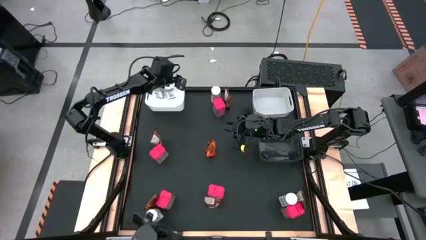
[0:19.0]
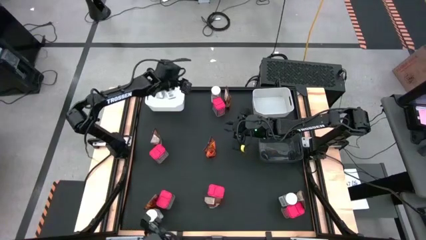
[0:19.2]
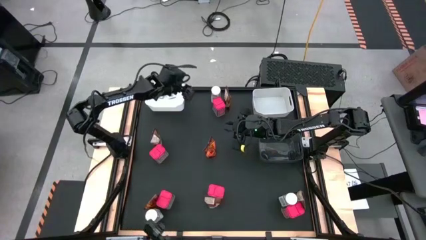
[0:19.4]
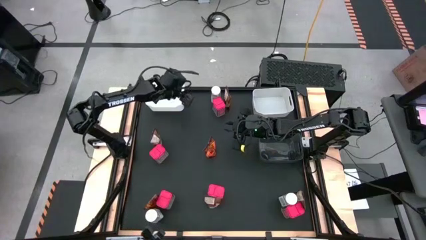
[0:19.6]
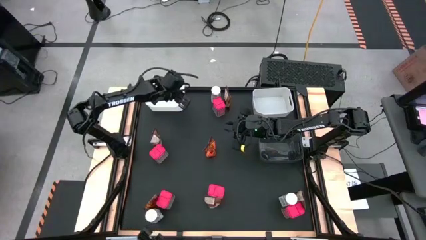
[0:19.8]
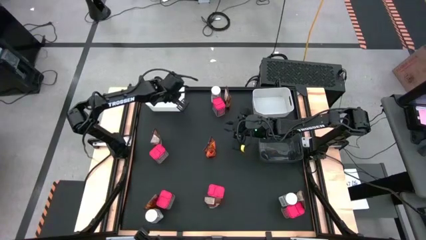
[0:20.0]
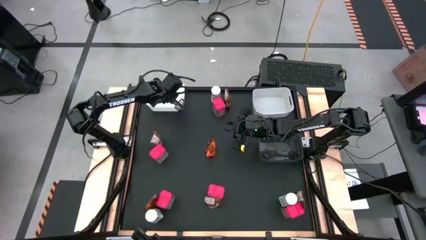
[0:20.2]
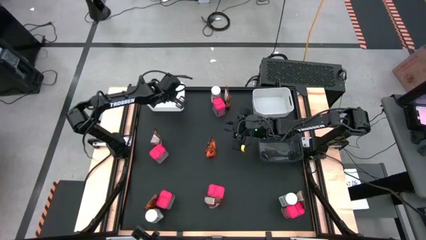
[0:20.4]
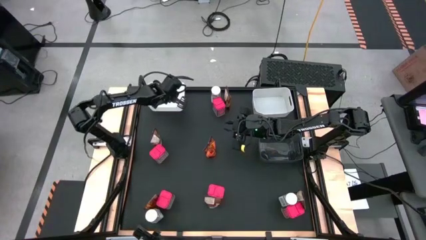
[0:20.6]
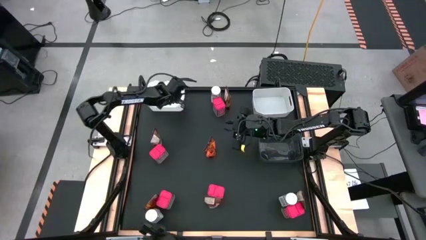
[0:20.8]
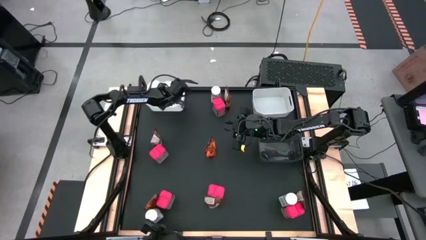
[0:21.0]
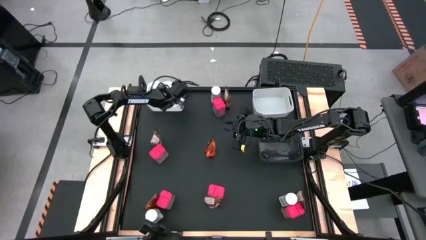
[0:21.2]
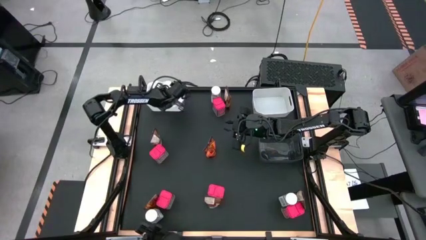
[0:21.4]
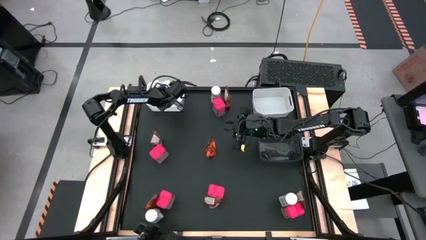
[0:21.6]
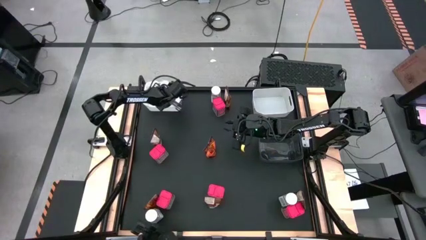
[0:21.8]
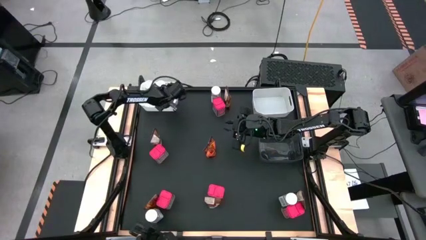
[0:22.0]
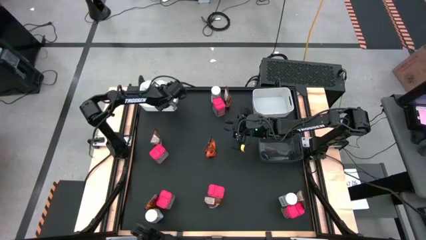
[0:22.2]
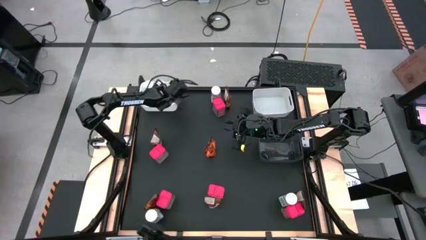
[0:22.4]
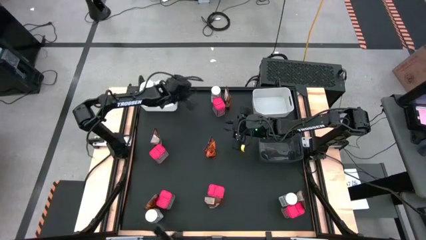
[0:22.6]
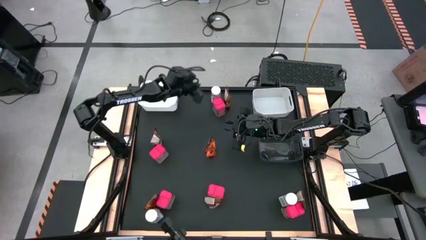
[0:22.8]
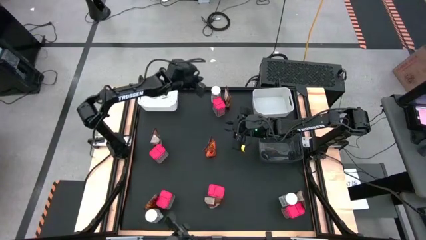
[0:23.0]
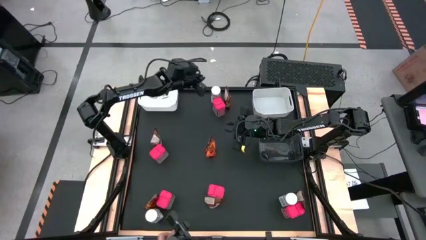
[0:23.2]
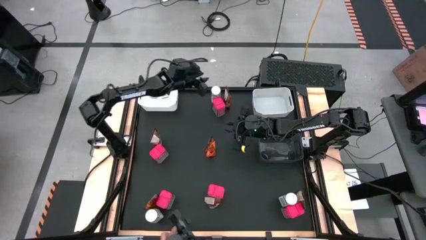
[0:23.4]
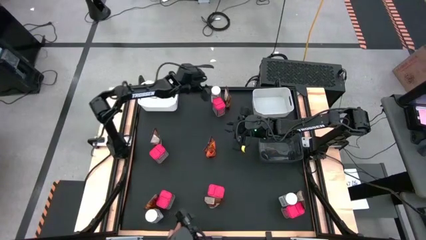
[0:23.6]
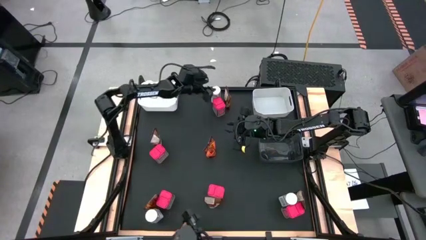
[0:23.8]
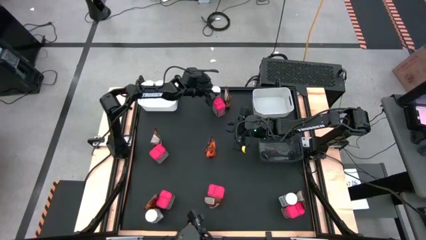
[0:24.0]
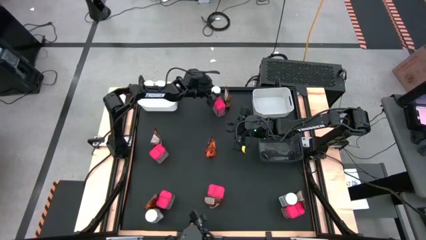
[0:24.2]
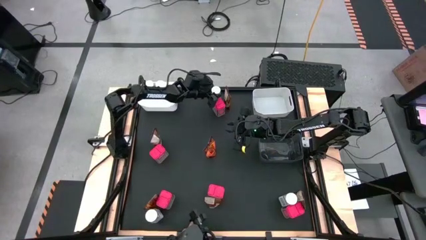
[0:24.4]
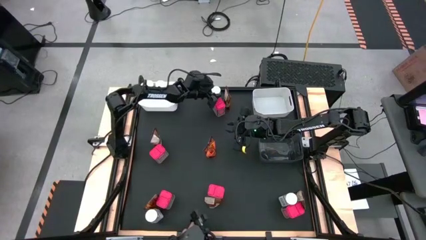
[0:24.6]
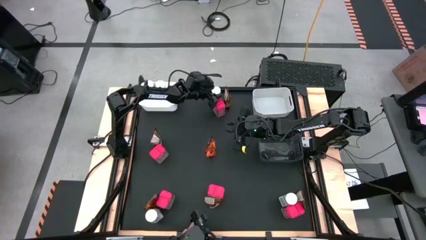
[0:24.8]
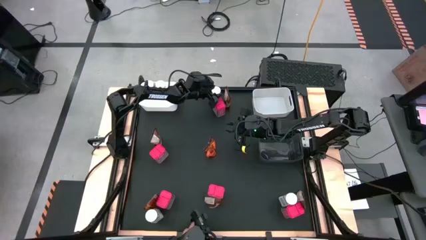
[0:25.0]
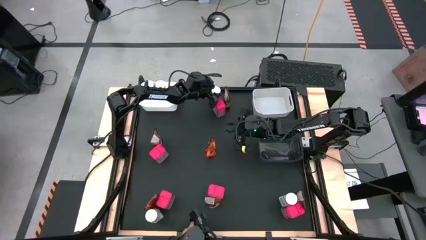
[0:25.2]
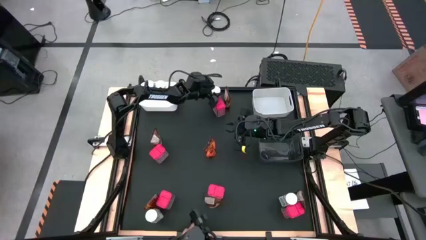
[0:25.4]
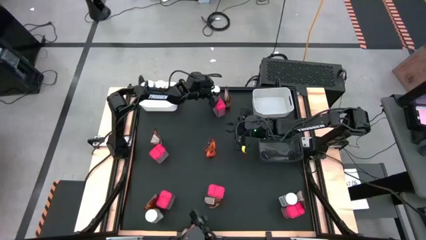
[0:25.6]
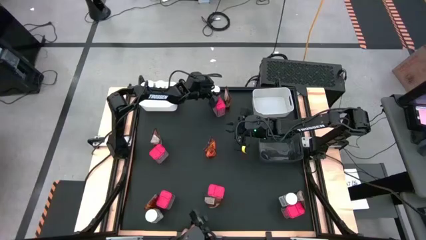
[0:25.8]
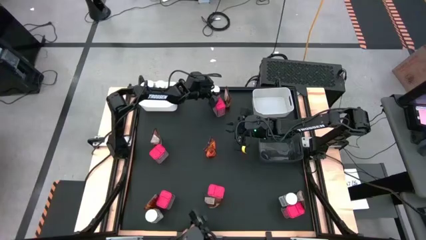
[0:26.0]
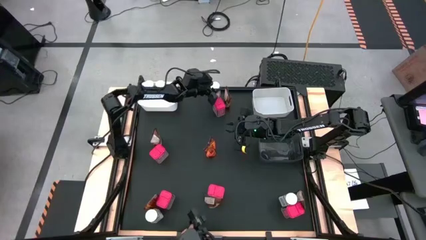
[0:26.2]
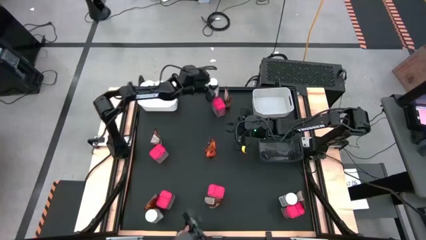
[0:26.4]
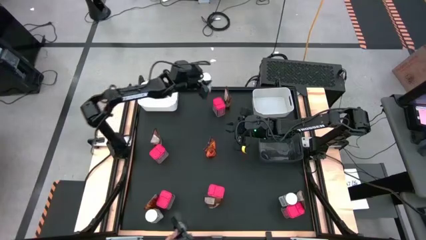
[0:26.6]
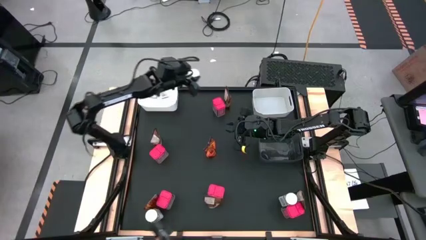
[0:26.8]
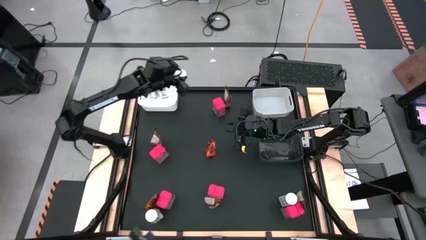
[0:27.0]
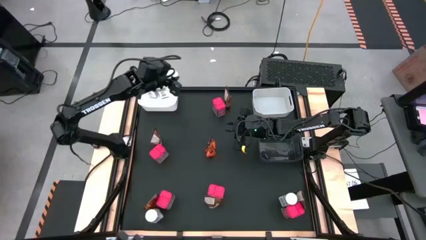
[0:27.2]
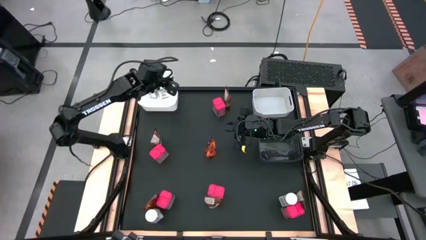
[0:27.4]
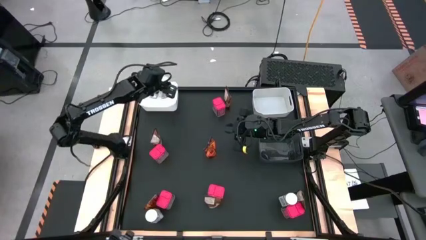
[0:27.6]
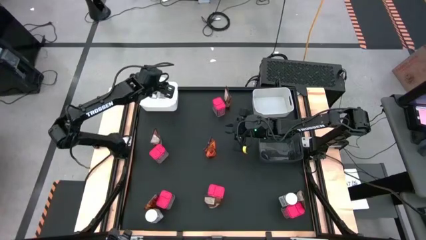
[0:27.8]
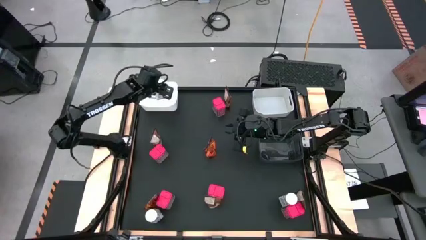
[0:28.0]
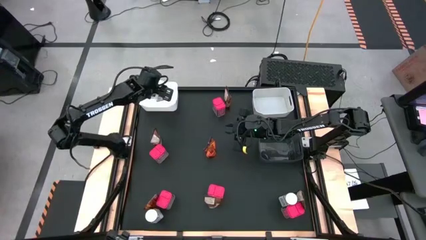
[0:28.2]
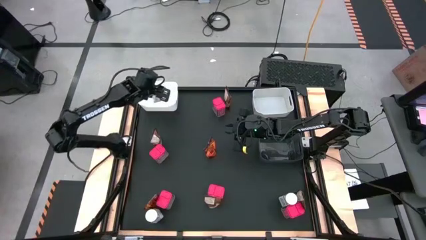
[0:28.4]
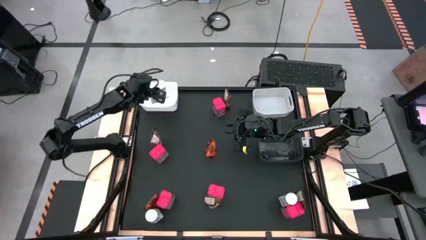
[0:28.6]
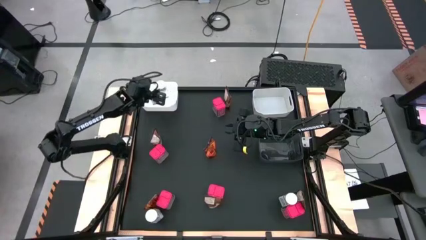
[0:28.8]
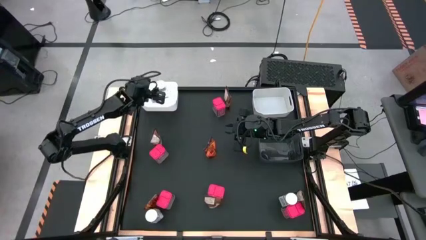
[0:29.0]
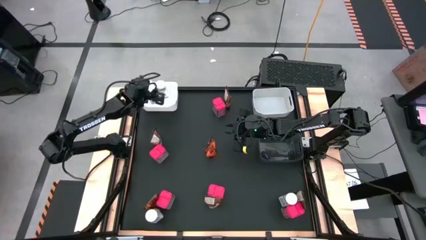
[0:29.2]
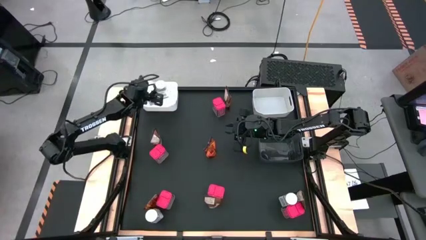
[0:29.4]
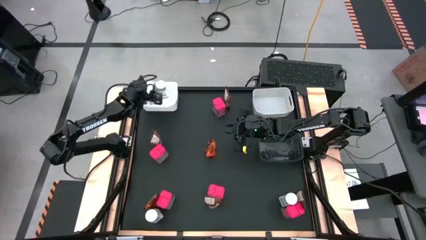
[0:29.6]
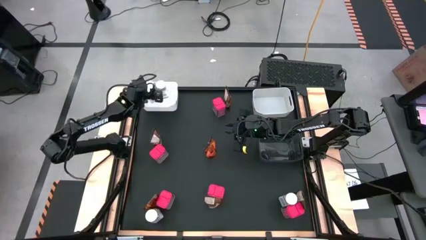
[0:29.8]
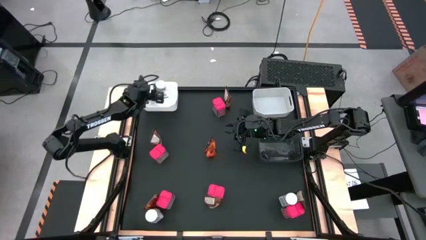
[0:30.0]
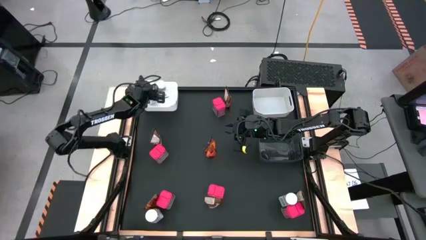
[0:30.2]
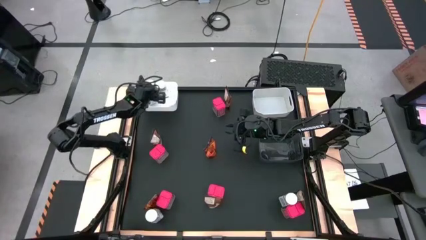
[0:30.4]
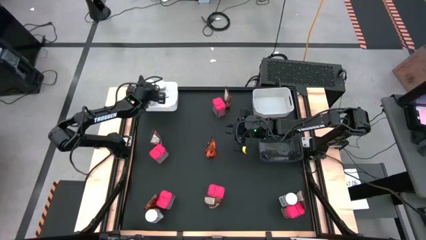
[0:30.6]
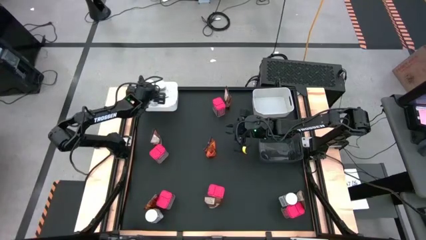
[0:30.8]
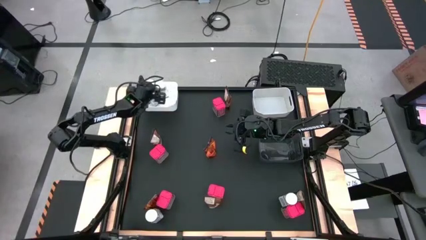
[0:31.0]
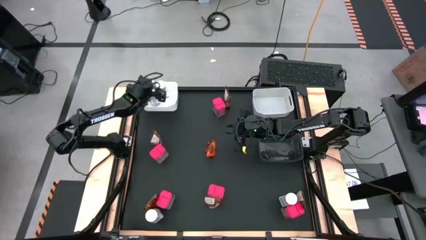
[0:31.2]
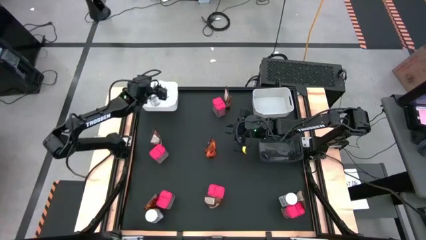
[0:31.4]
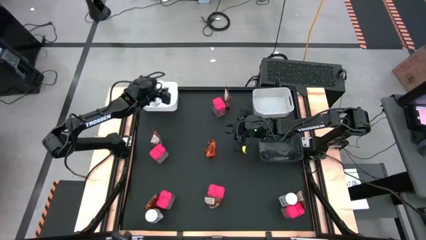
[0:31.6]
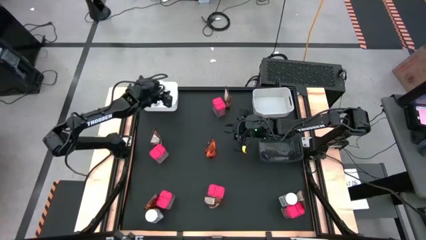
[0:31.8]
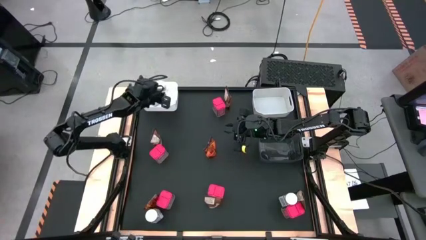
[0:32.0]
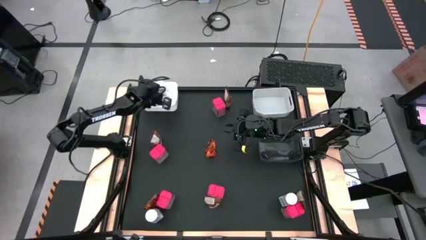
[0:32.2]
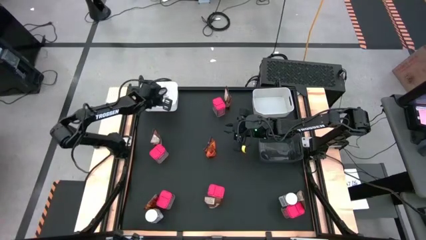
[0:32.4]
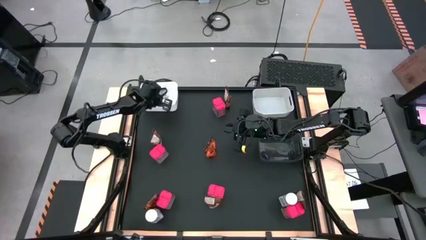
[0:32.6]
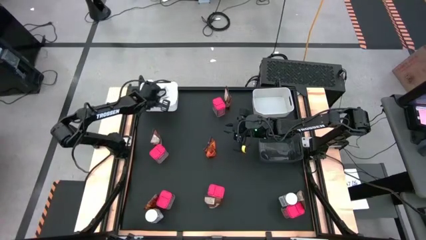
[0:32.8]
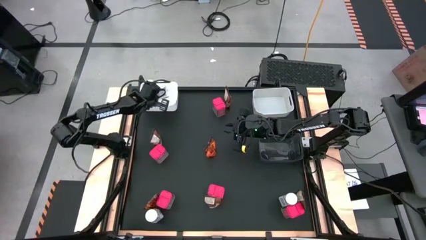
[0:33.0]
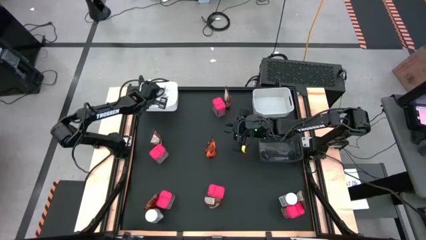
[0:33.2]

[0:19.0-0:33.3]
Task: Sort spices by type
Put the white seasoning bottle into the left white bin
